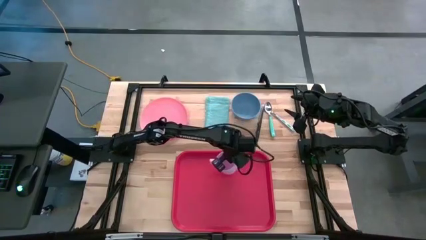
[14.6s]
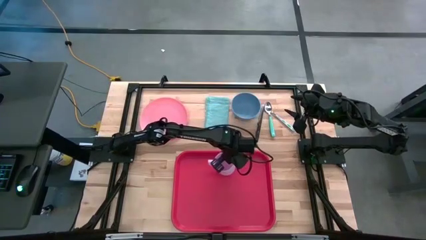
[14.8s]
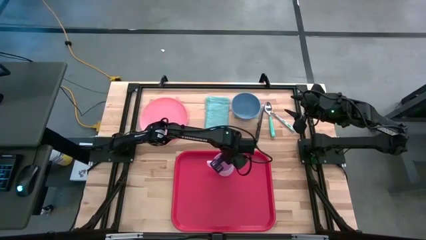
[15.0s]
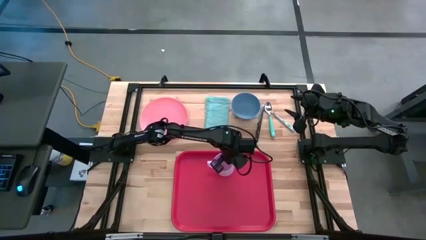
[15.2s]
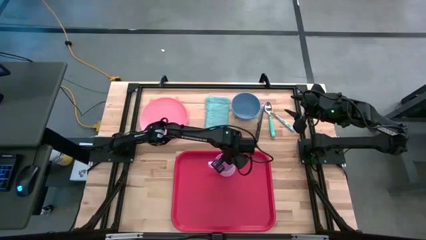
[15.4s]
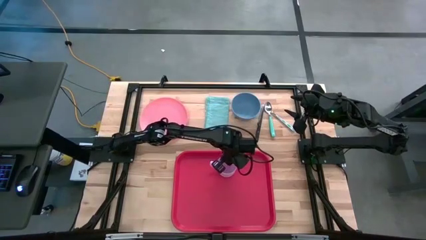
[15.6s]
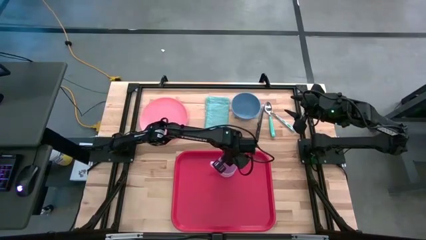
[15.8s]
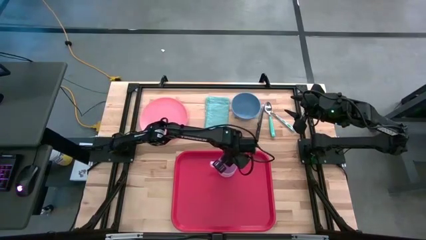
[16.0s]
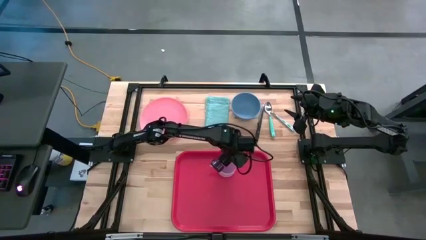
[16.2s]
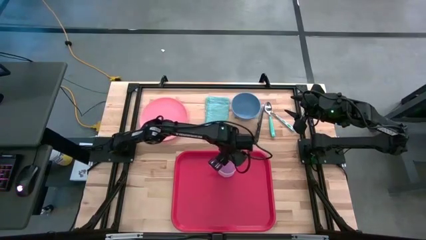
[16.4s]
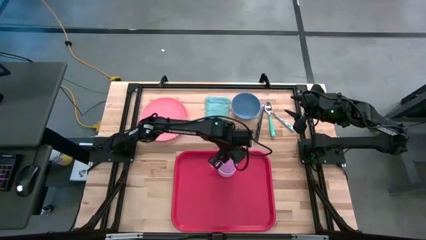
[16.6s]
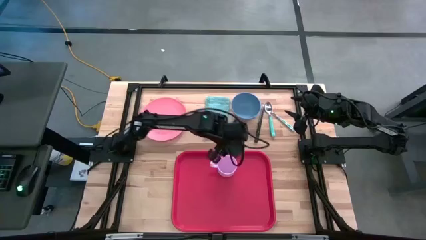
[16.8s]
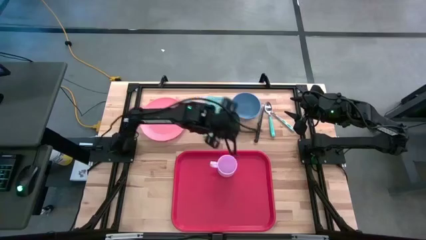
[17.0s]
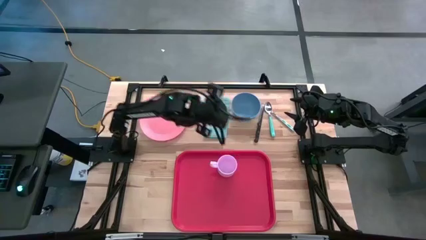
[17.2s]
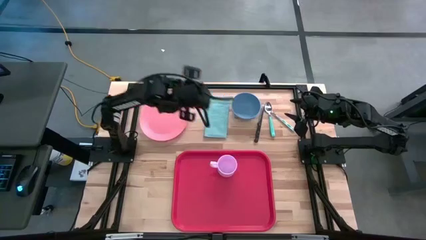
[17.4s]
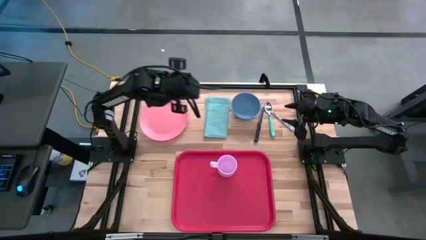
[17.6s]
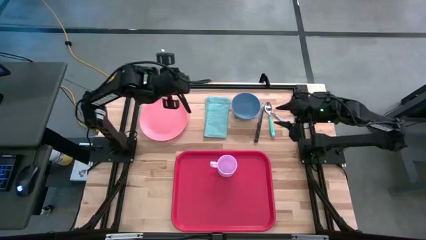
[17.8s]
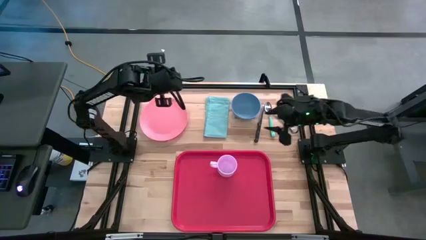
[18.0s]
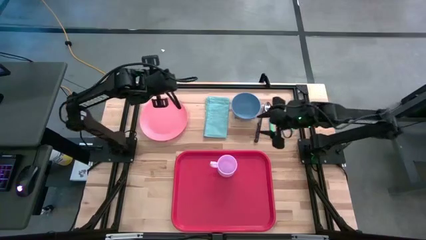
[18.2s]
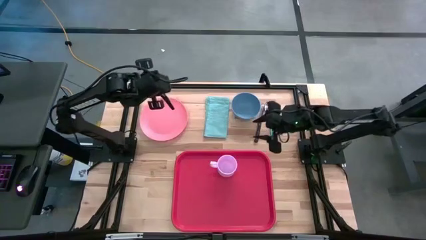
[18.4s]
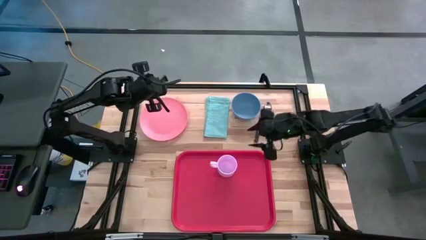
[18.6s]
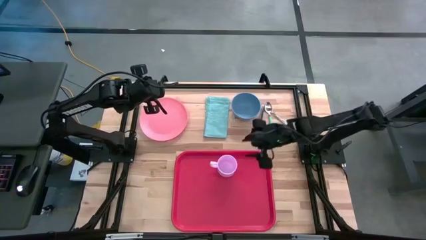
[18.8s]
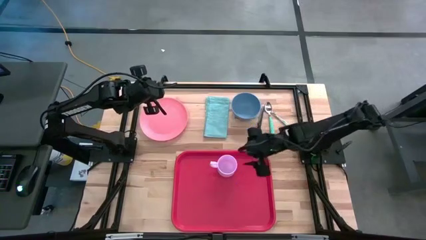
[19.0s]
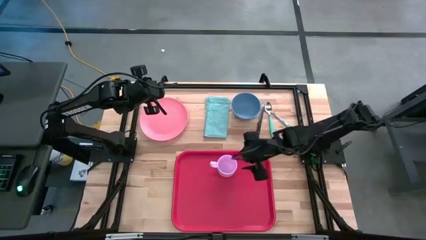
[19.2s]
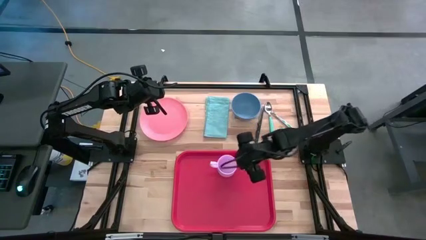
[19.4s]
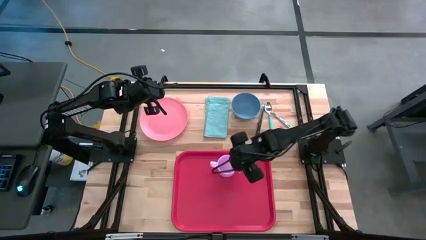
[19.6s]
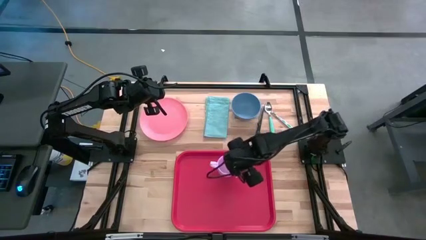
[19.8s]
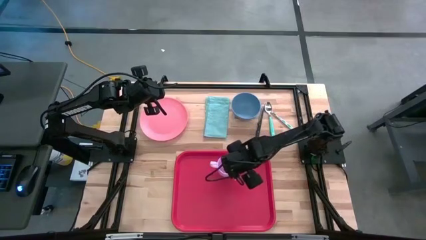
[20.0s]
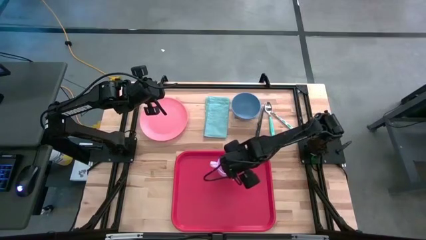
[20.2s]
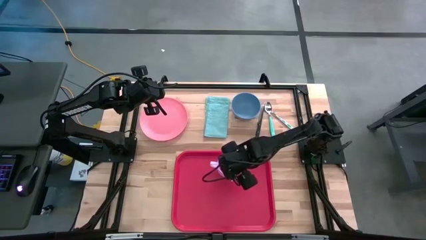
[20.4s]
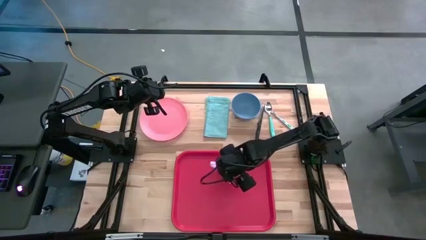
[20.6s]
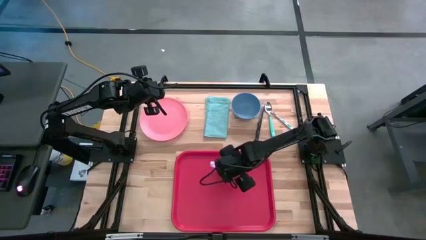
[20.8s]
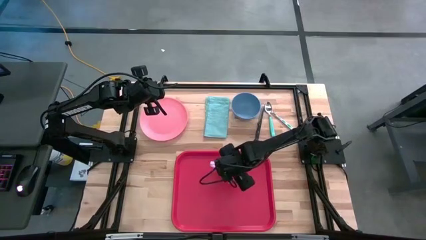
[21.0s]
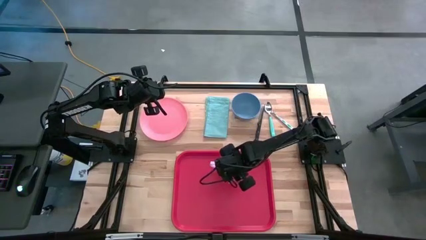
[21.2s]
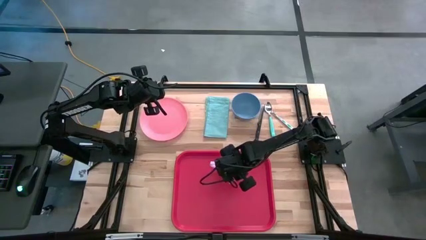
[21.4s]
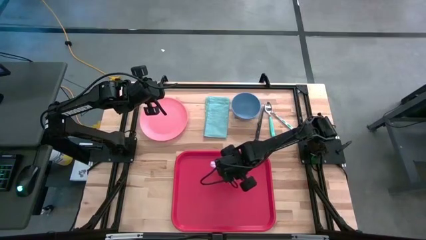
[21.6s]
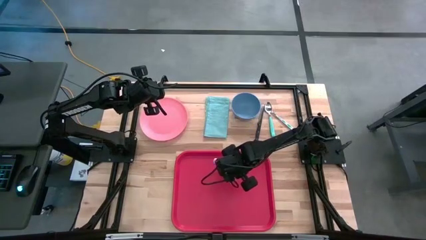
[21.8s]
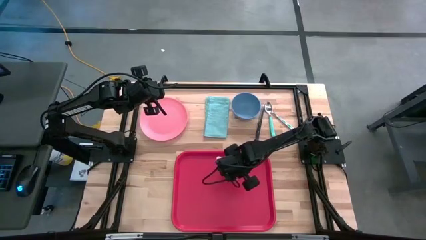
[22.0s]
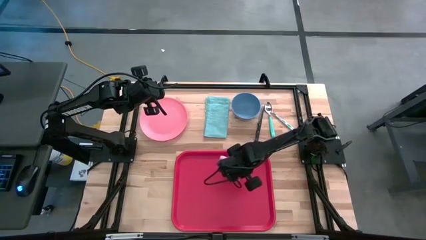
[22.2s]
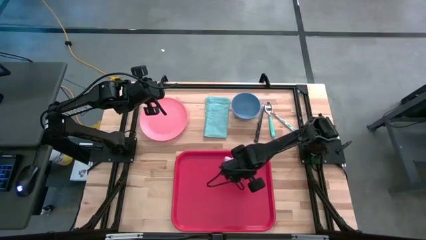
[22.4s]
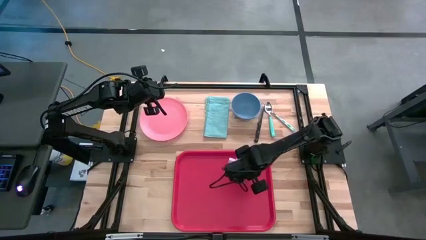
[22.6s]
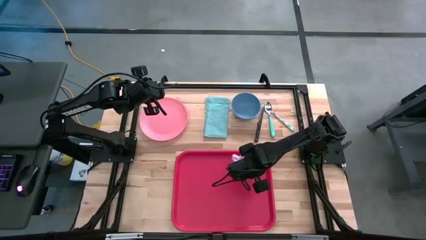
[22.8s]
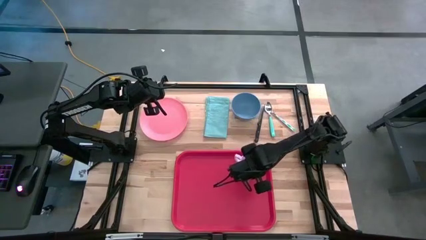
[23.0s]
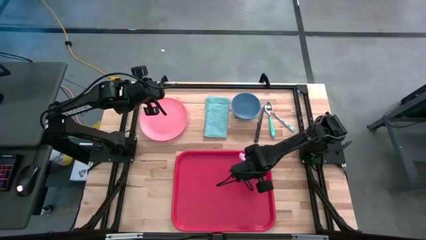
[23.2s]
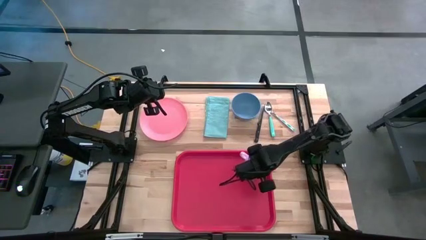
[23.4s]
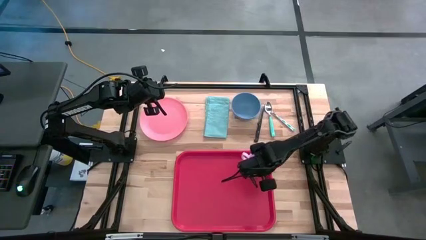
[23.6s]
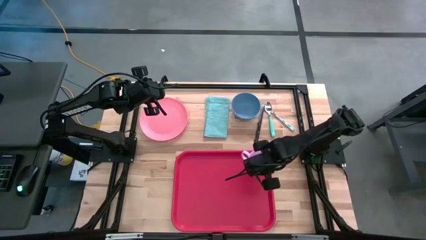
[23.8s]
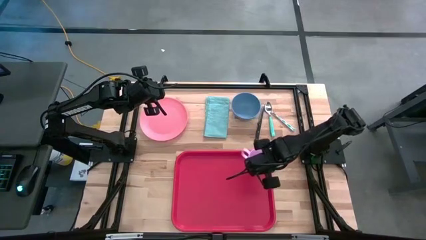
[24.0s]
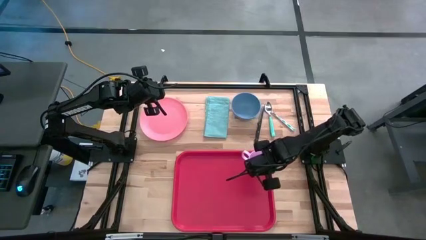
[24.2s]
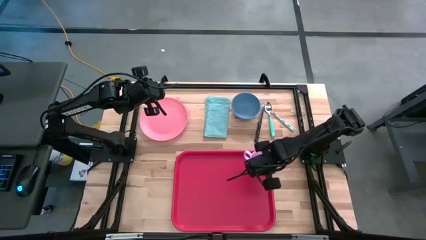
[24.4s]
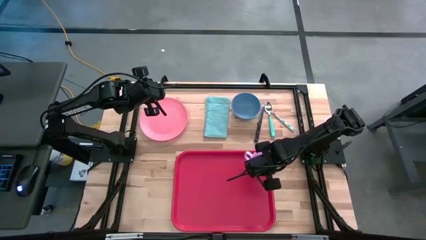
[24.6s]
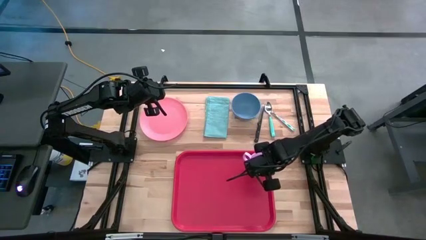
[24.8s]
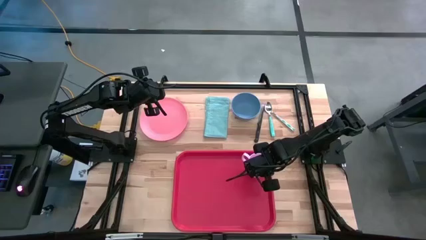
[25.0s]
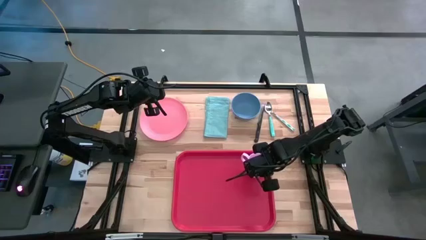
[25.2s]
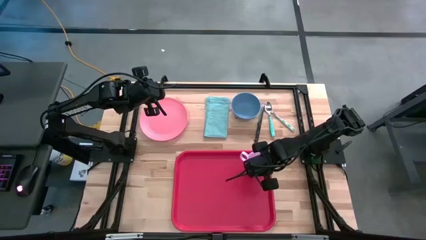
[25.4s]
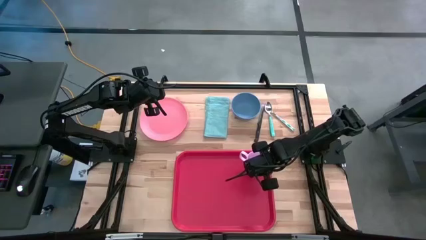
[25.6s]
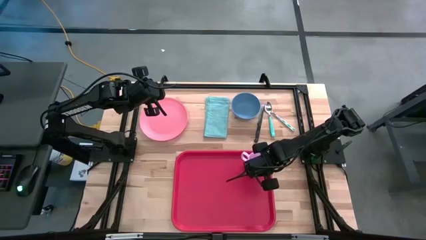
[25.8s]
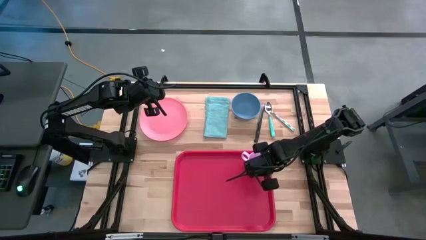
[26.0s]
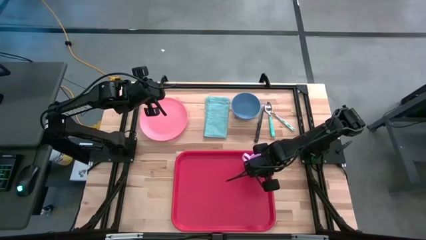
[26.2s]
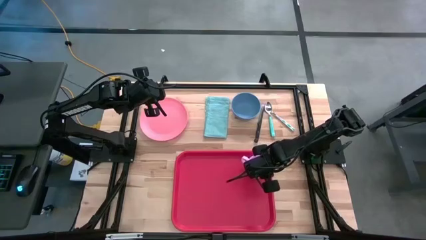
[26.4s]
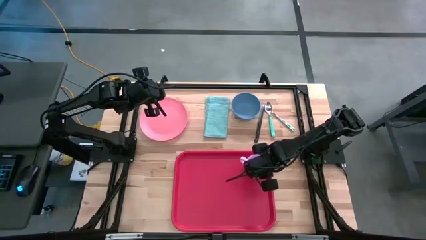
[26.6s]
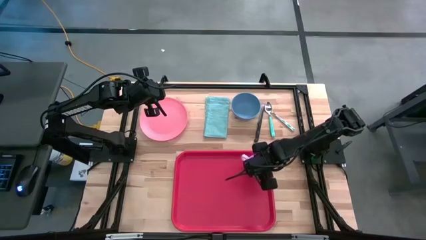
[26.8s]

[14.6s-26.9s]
Task: Set up tray
Put the light pink mug on the red tray

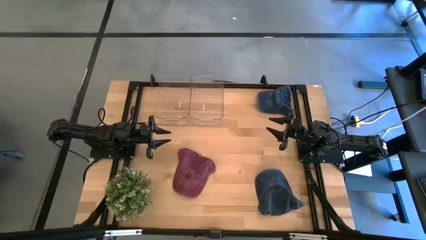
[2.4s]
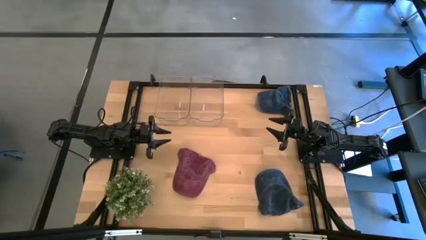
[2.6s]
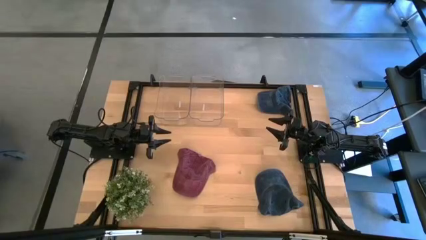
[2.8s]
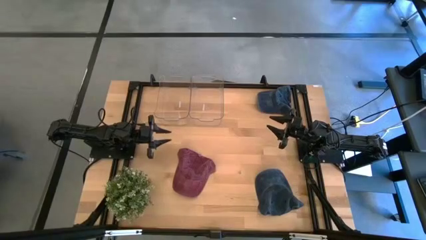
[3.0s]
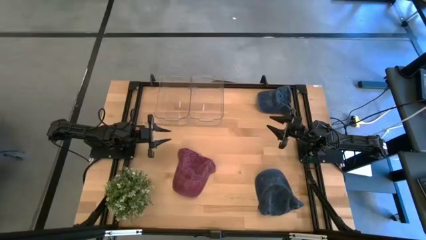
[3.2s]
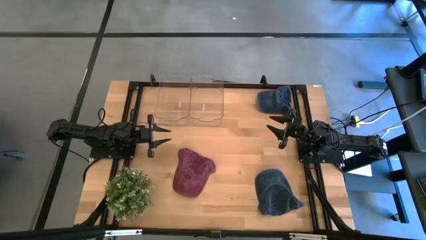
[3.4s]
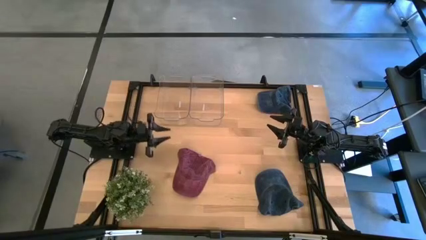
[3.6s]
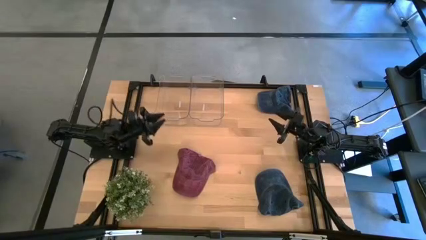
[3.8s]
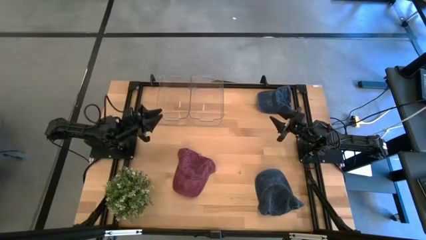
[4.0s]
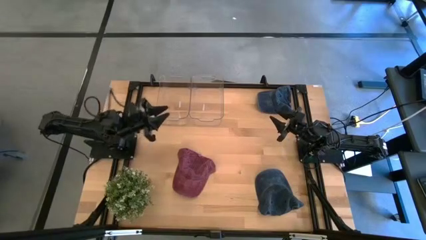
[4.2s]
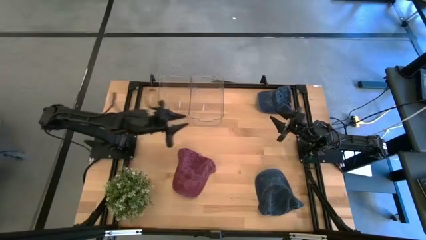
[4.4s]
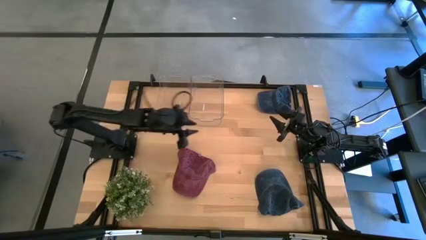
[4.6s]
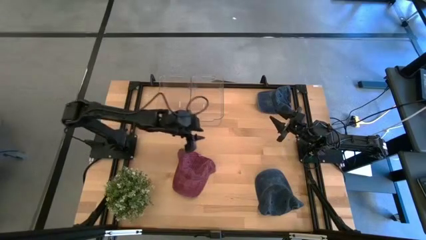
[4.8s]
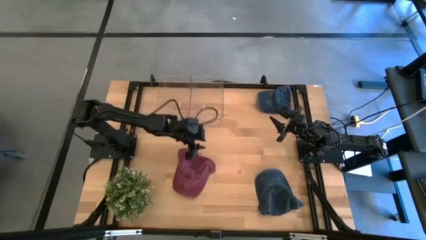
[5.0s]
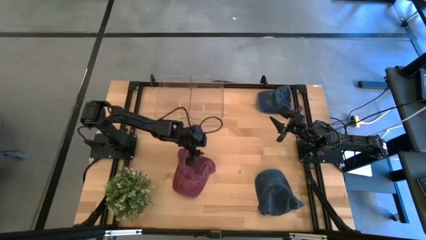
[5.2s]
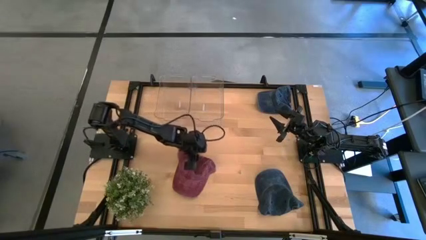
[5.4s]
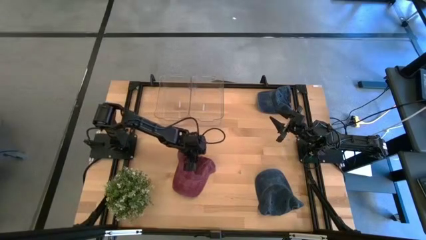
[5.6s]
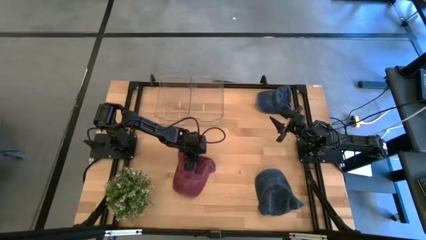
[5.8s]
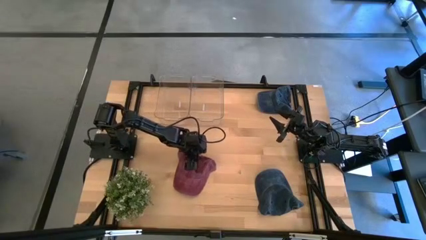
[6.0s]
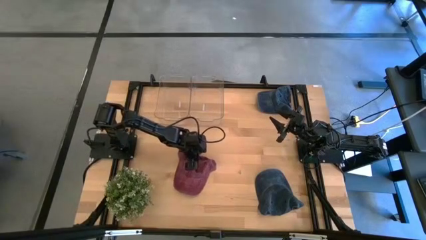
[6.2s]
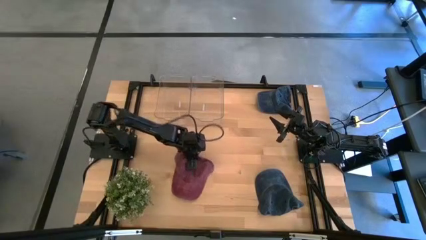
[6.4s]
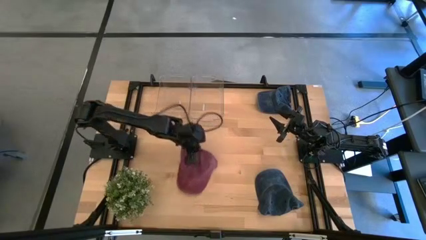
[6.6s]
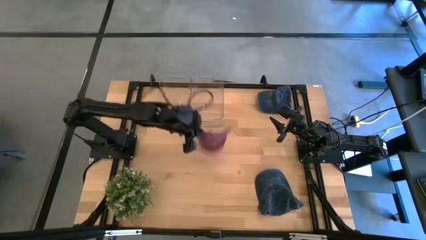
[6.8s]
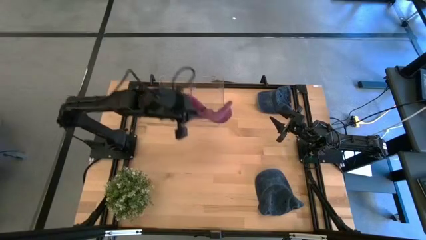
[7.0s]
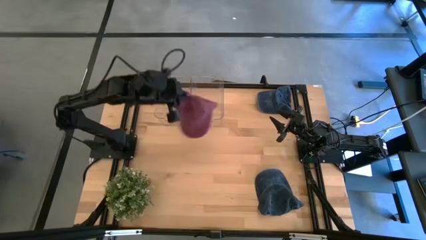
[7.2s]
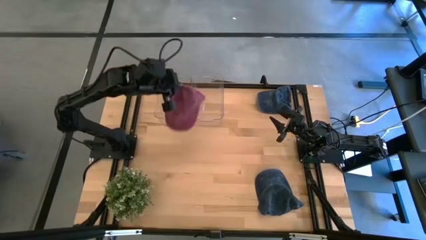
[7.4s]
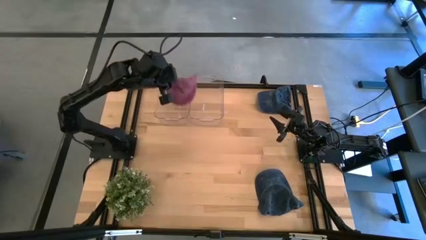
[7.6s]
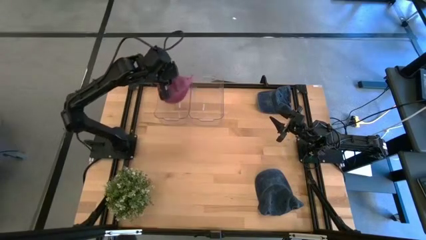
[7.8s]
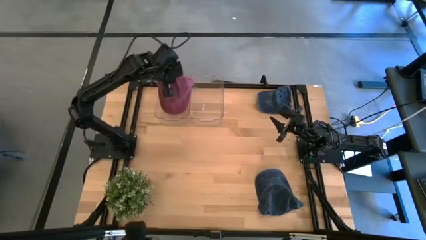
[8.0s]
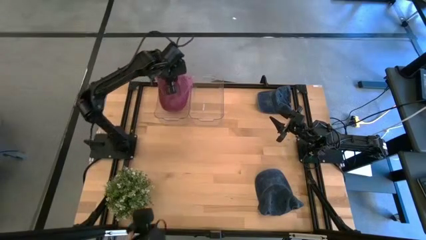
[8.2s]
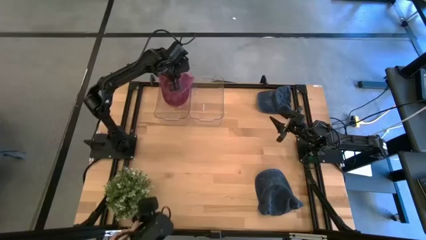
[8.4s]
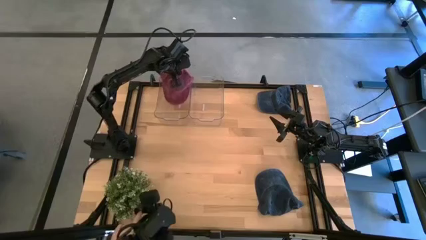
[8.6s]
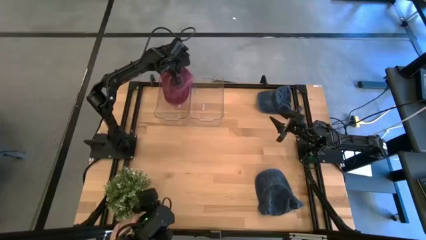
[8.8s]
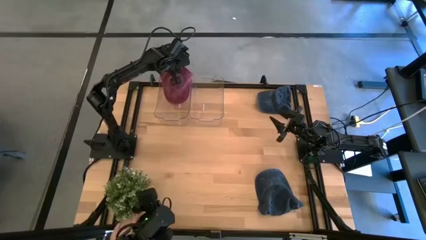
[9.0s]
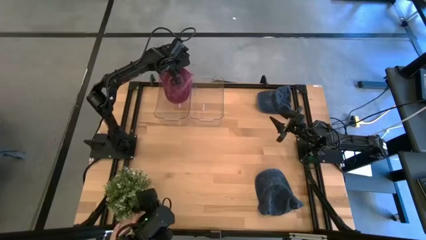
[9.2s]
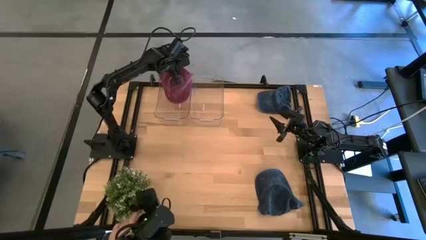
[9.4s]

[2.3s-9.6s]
Task: Pick & Place hat
Put the red cap into the left transparent bin
